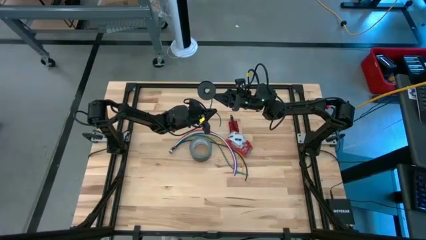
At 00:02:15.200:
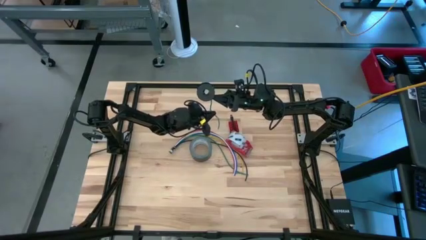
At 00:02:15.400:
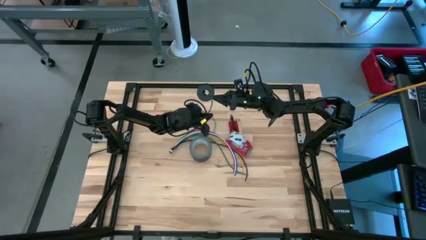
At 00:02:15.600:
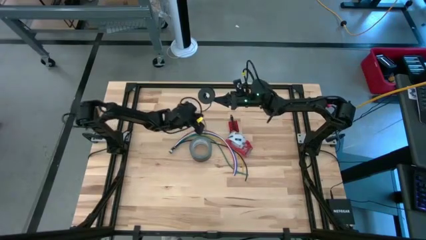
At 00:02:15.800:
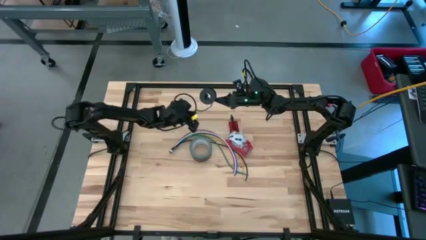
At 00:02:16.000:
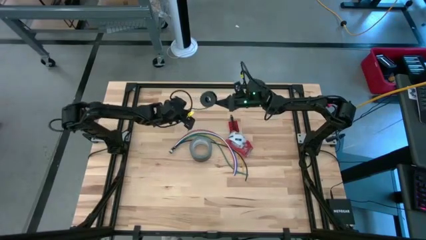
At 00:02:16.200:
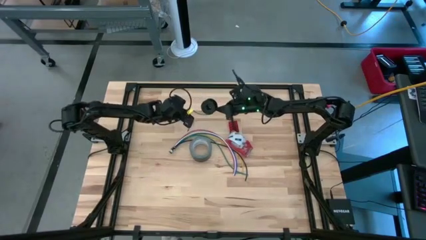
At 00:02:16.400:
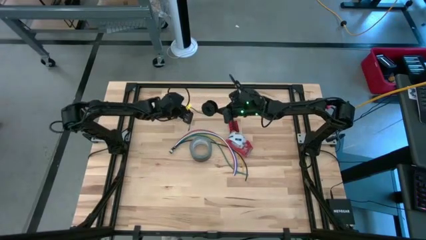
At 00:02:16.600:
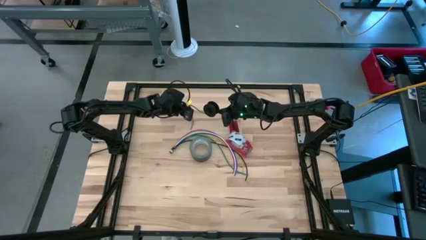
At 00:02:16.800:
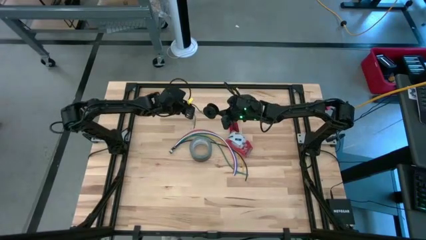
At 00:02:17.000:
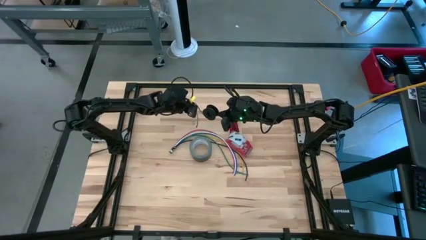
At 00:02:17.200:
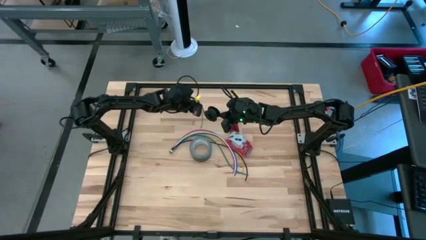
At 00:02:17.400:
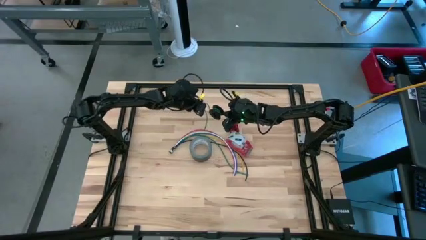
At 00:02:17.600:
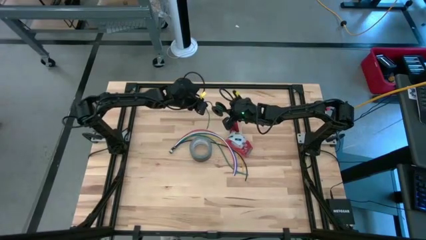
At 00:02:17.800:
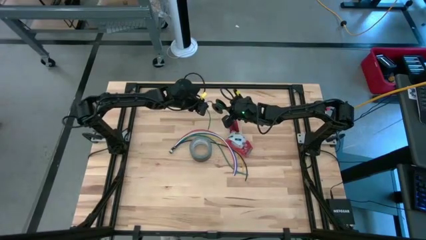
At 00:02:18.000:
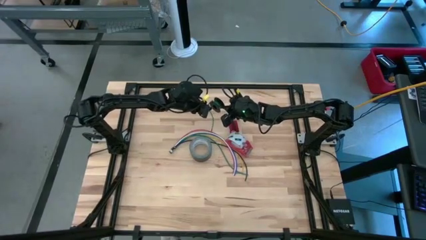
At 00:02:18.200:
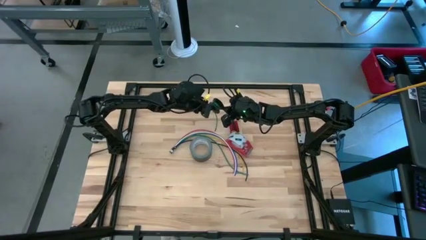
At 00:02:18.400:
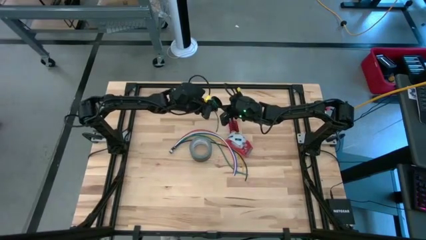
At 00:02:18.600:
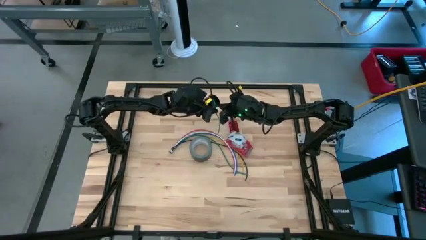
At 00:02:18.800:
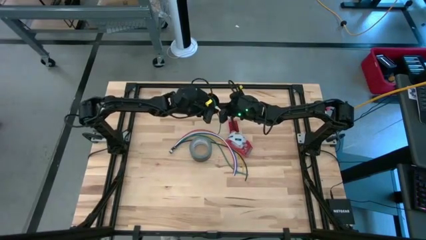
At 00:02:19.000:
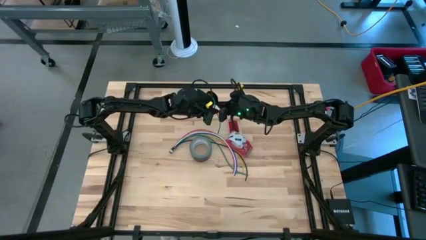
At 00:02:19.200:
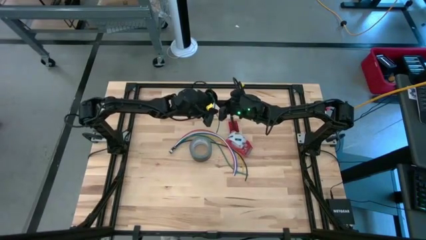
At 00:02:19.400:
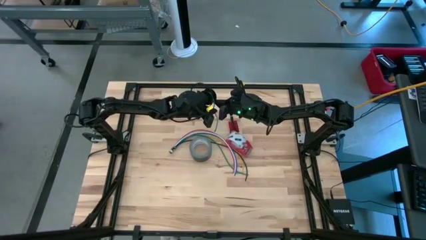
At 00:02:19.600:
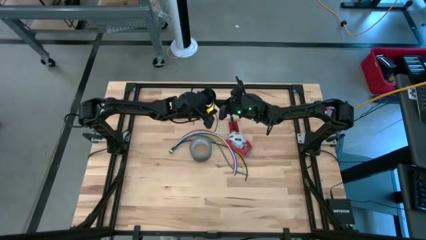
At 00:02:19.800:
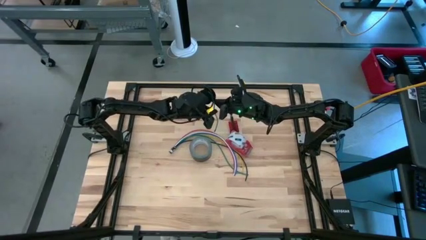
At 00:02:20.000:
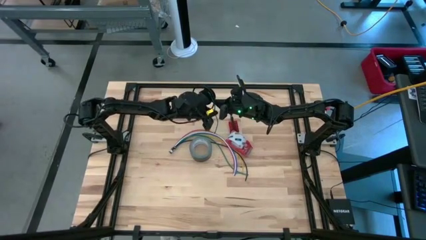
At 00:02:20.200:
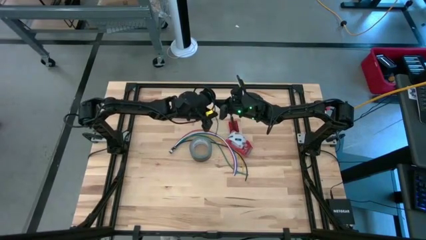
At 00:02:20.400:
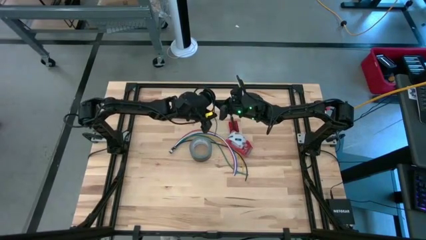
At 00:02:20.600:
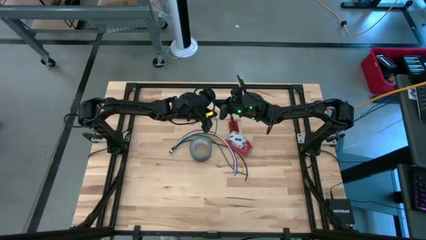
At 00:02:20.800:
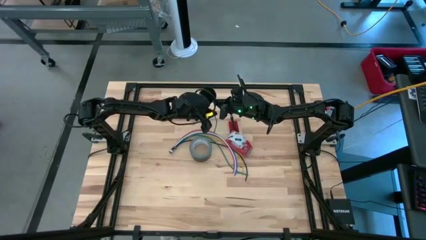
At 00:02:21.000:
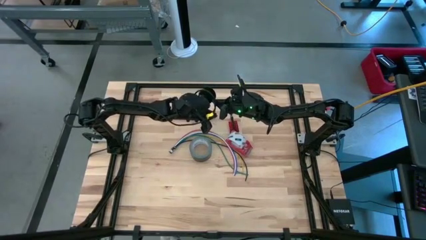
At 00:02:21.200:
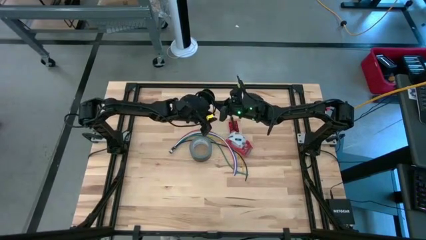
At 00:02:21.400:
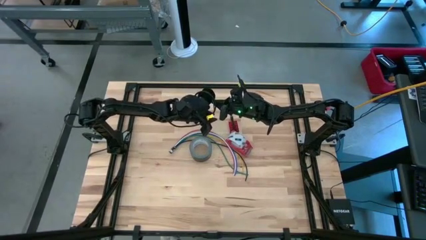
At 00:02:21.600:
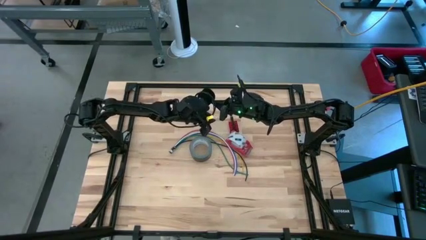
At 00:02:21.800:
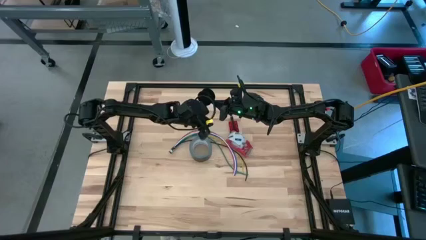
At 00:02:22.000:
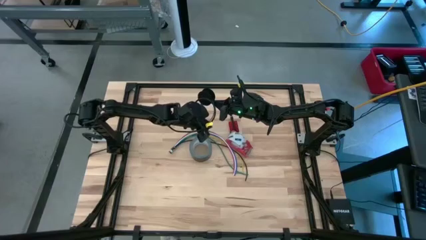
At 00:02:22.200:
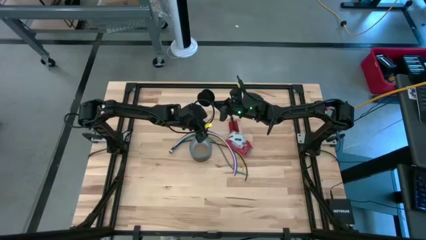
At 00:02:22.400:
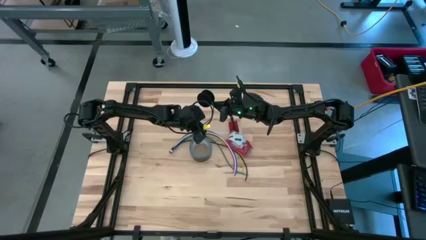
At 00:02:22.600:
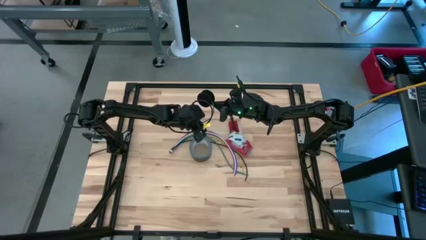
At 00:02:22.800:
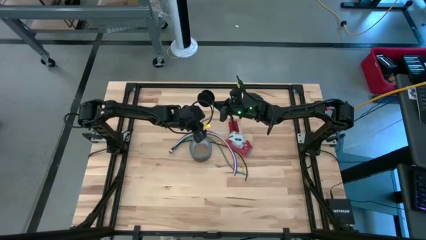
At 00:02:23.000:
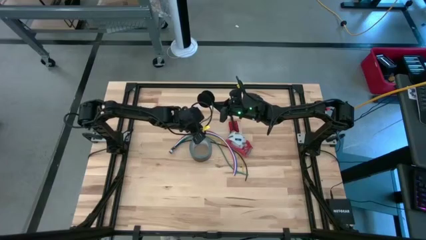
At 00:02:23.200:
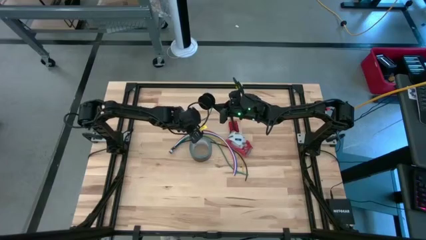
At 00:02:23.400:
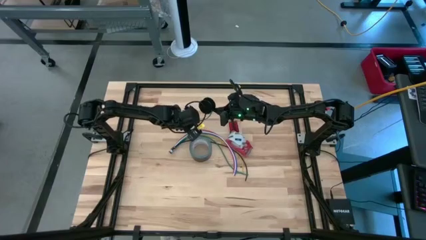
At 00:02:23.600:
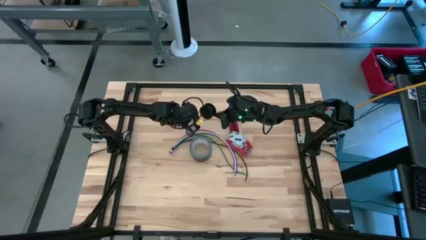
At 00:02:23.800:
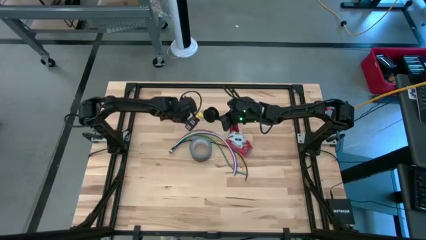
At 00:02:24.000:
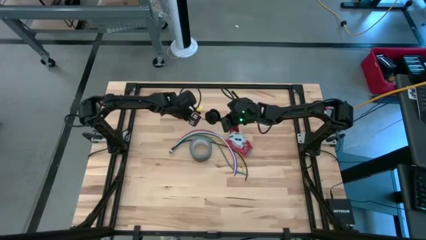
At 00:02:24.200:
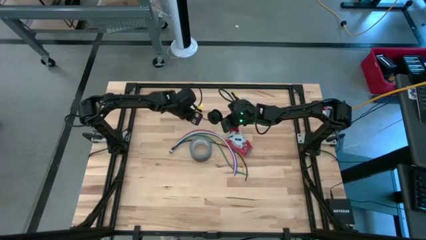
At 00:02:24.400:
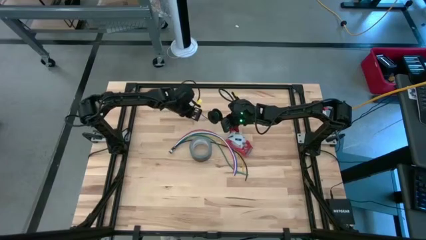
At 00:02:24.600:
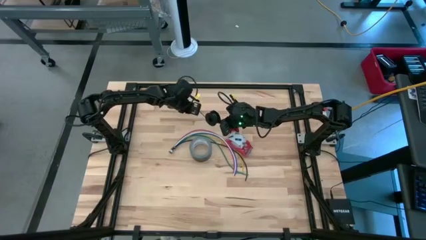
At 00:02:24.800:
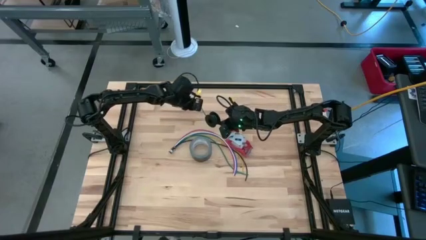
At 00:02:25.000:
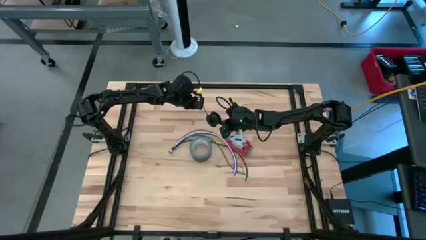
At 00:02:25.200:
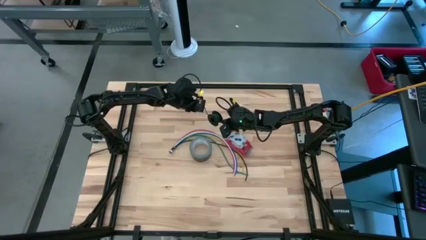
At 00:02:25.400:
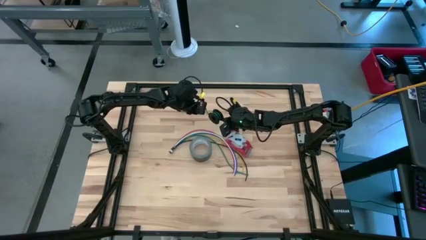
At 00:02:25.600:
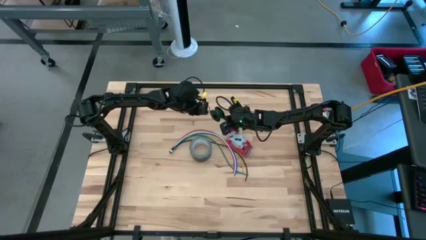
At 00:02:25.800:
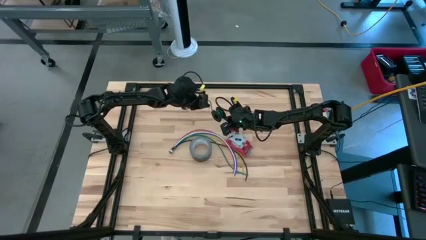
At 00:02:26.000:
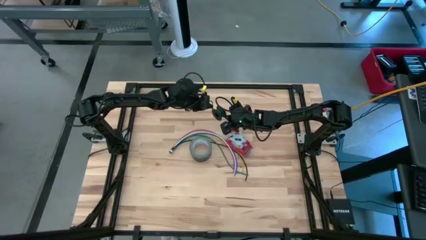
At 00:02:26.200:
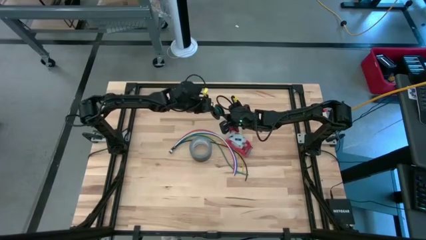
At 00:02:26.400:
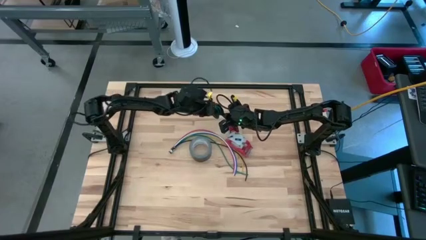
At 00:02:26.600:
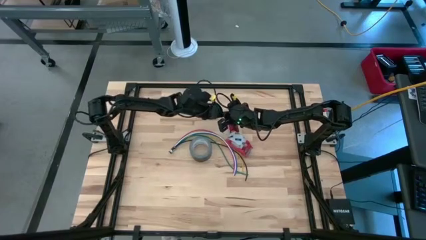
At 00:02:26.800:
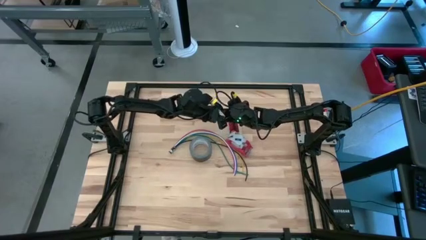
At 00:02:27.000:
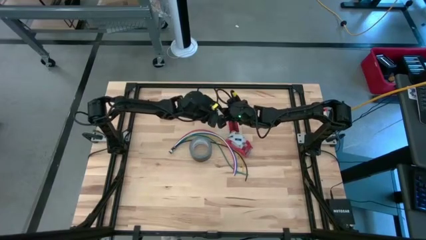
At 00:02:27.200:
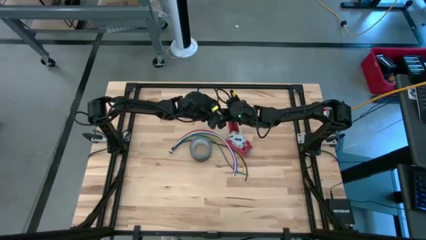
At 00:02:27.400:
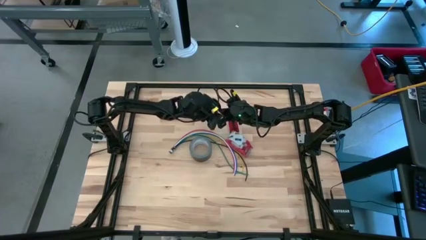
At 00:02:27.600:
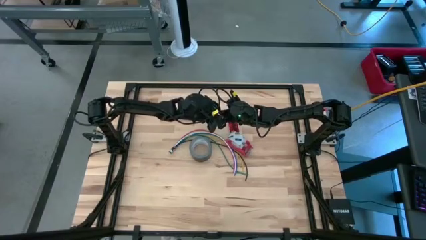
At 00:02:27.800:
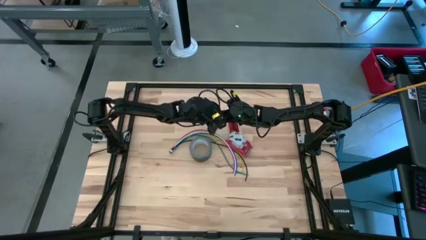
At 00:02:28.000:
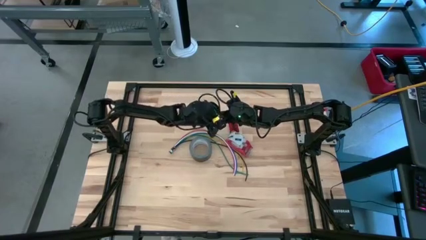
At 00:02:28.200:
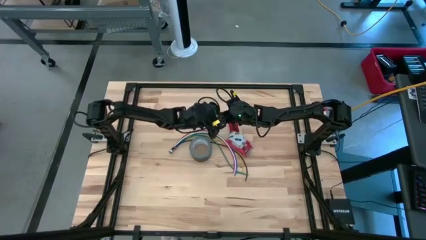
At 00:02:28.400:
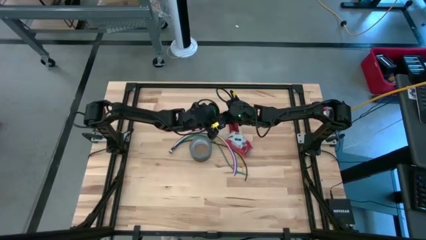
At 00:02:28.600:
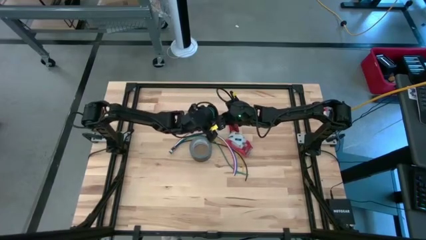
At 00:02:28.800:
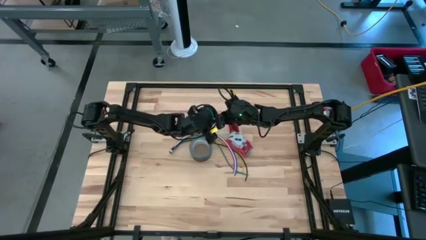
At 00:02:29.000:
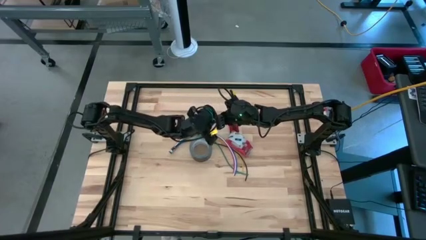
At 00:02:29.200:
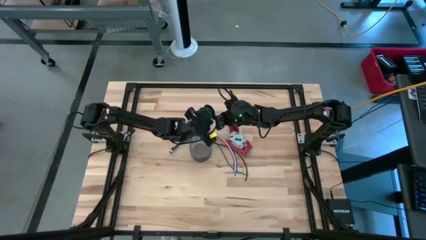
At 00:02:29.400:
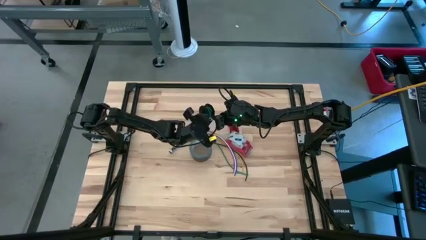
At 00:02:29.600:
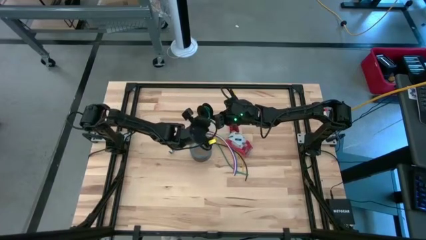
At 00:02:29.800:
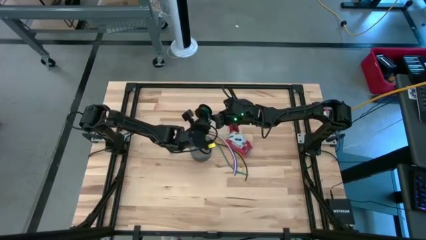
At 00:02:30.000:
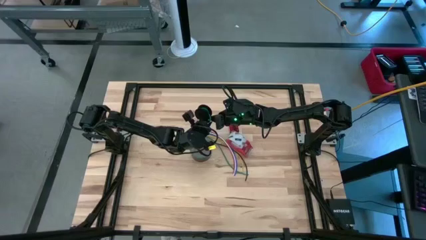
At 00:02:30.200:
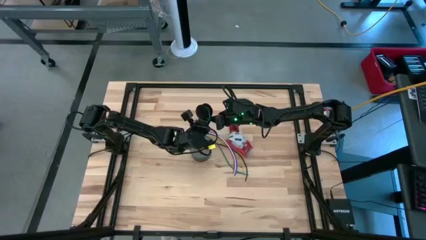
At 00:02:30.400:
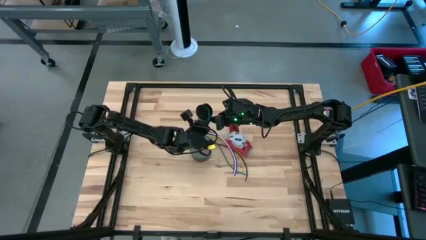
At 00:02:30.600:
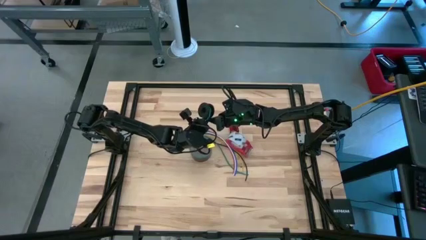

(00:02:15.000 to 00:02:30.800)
Task: Coil cords
Coil the green wire onto the black spool
